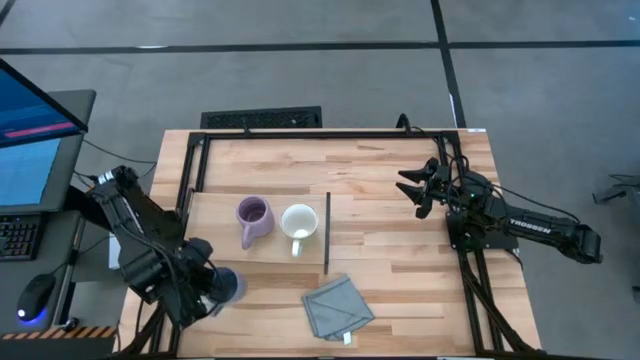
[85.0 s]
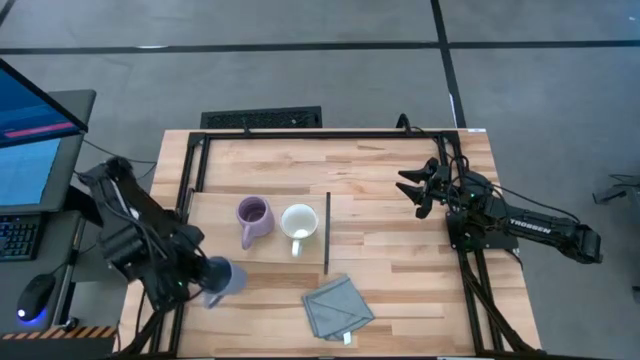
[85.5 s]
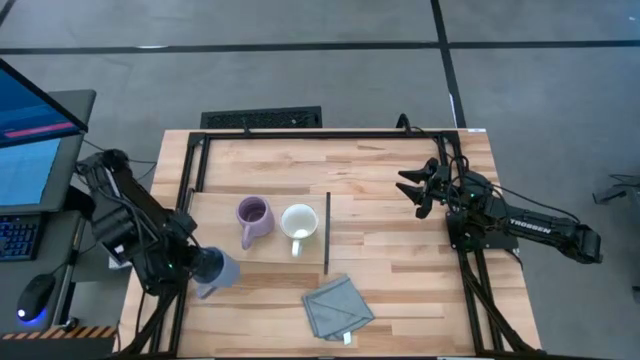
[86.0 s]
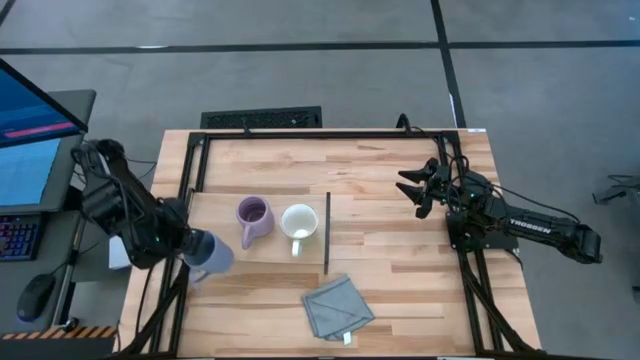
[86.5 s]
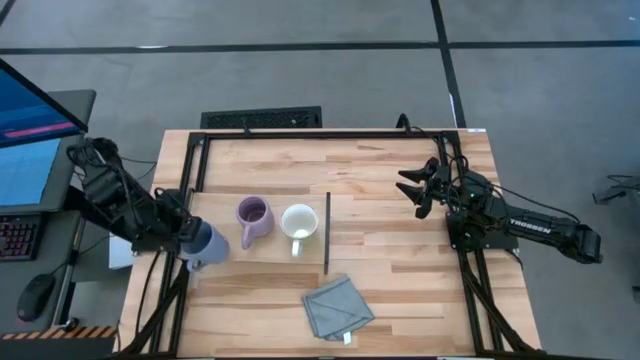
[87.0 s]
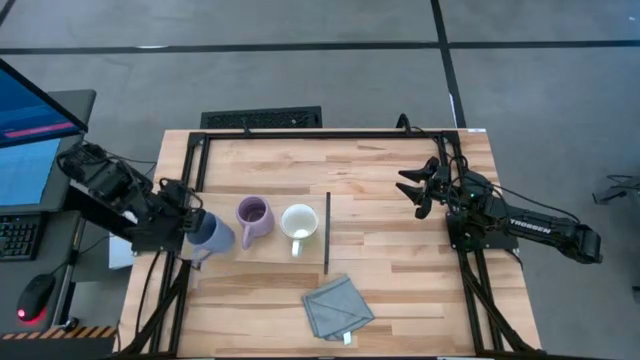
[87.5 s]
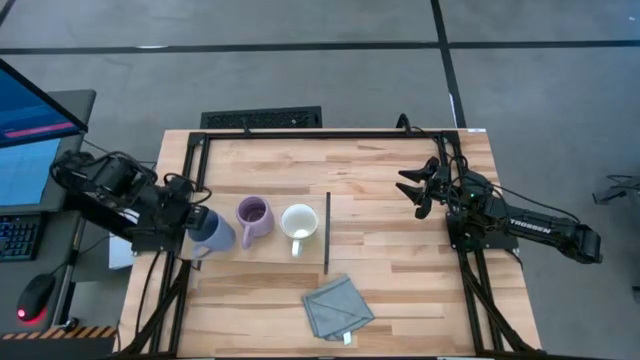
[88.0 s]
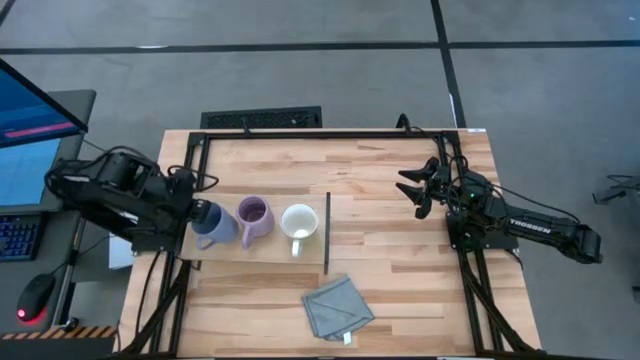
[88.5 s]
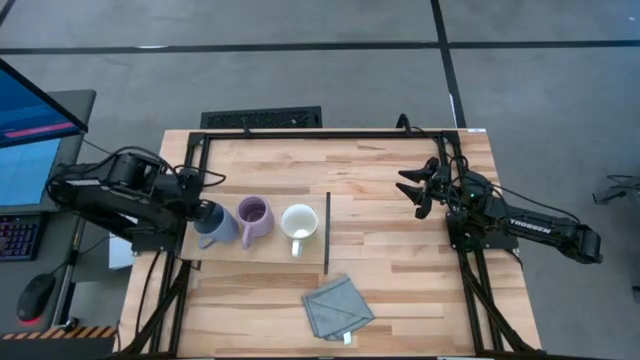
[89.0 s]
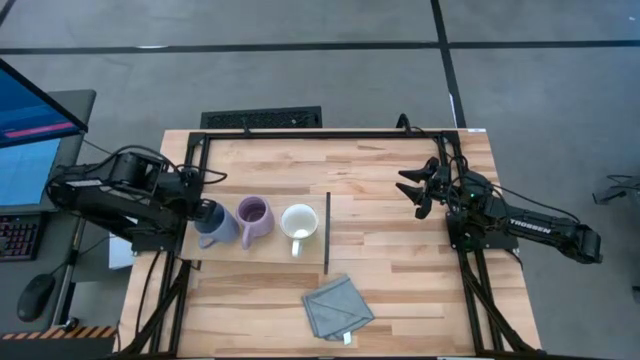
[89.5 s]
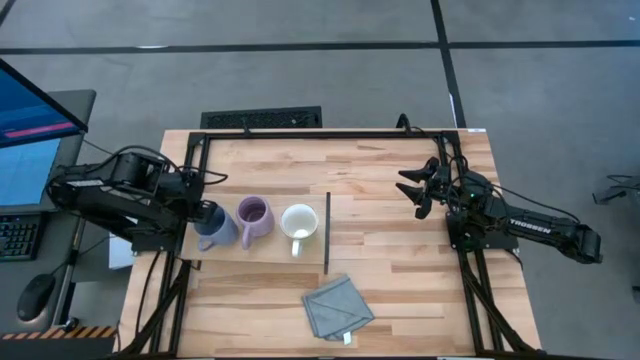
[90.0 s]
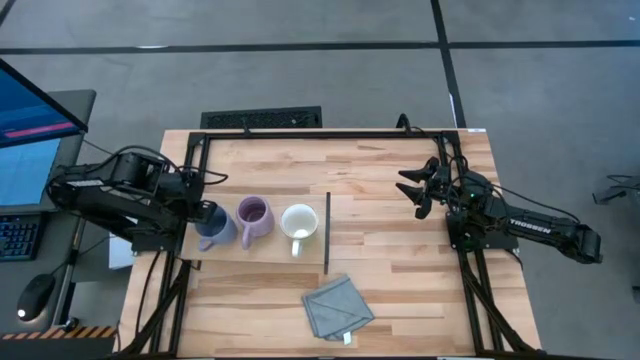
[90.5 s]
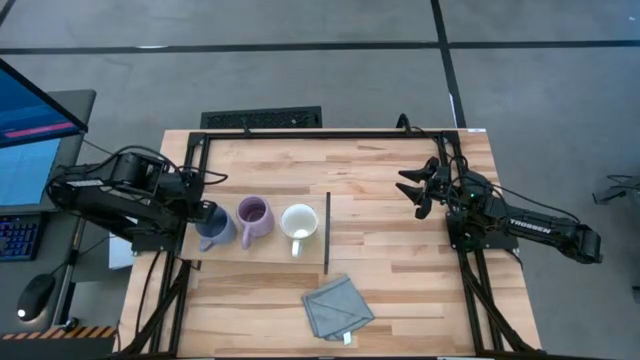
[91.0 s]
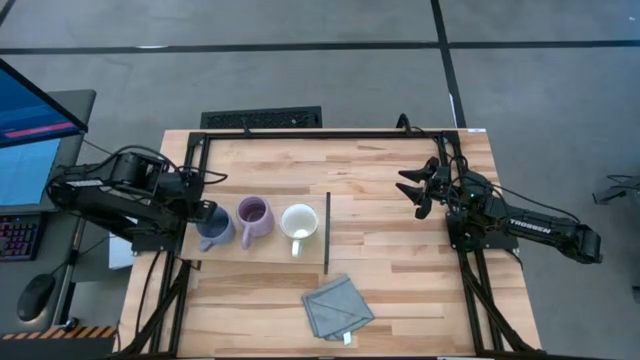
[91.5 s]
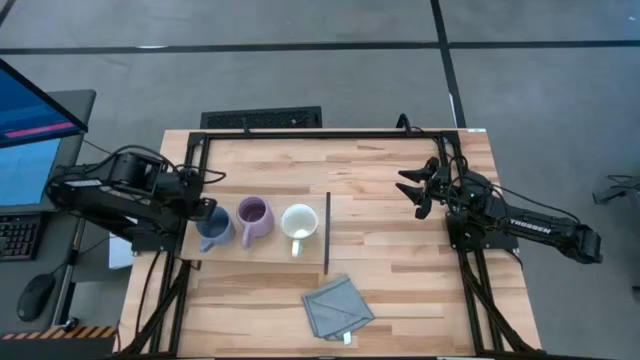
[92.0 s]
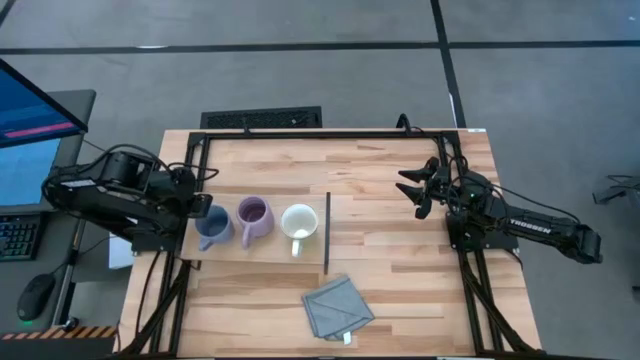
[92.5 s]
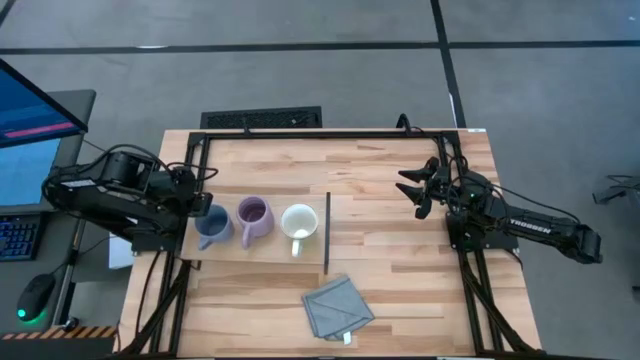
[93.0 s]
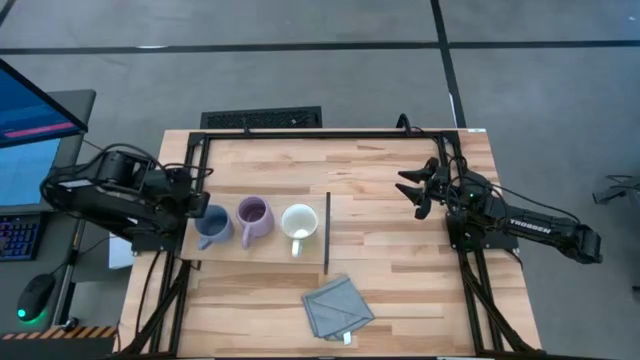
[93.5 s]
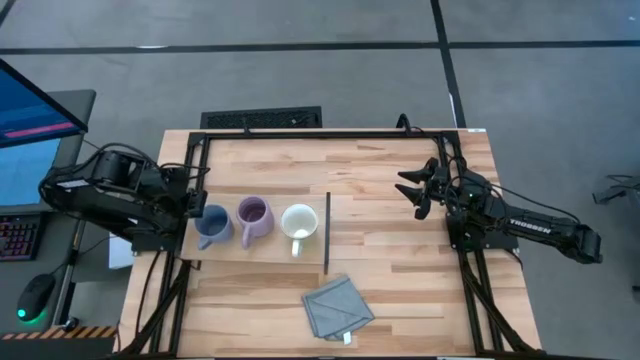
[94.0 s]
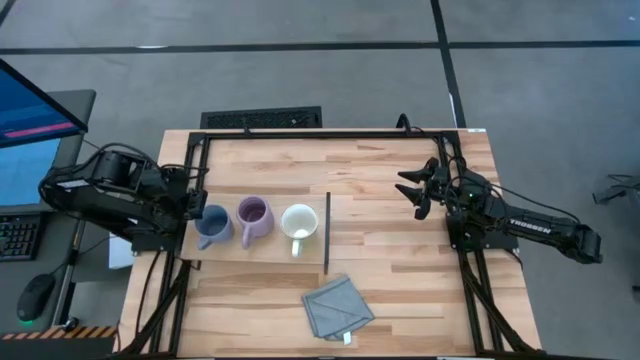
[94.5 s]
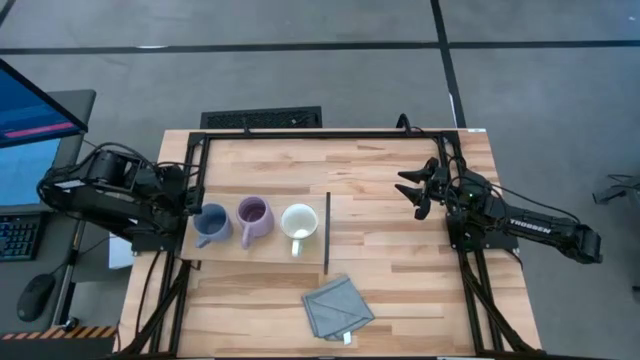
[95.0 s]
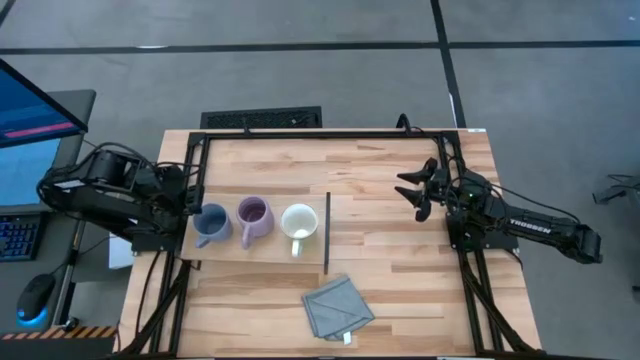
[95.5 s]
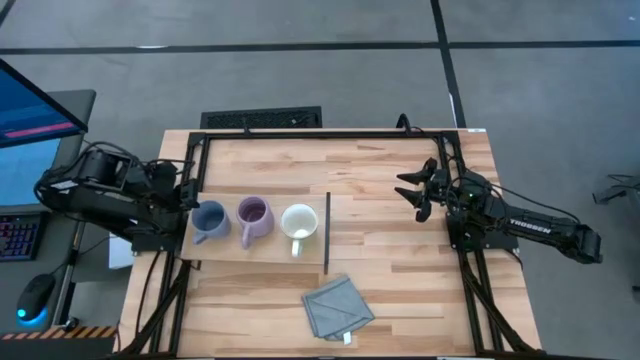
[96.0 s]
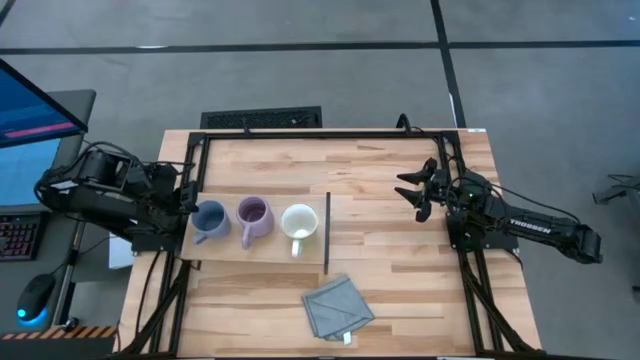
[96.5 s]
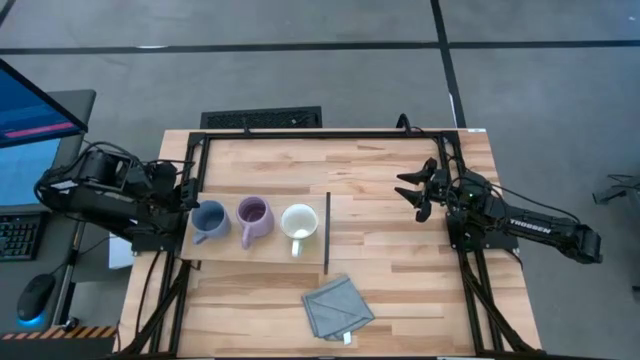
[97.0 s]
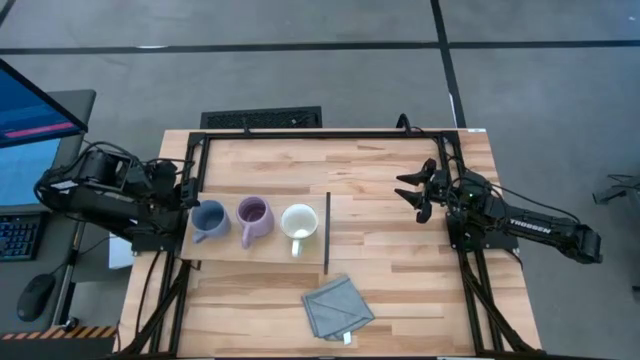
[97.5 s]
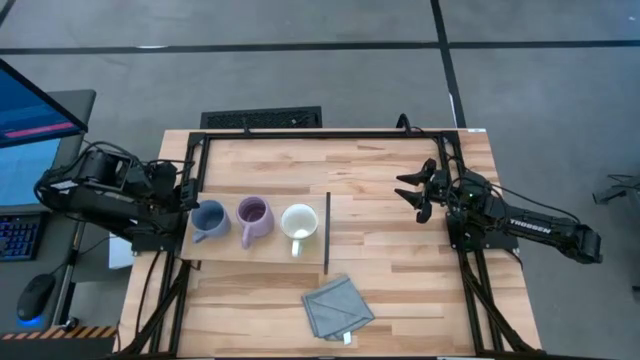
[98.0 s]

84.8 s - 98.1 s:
Task: Stack small to large cups/mugs on shelf
Put the blue mug on the shelf

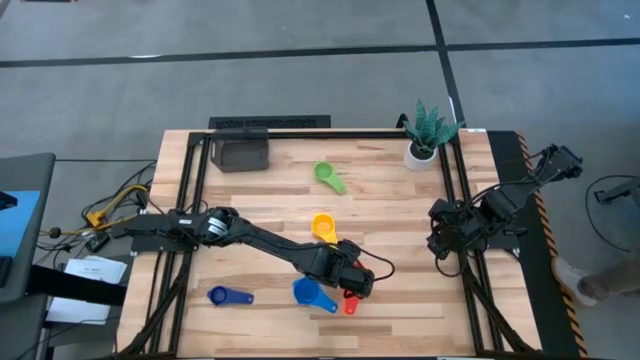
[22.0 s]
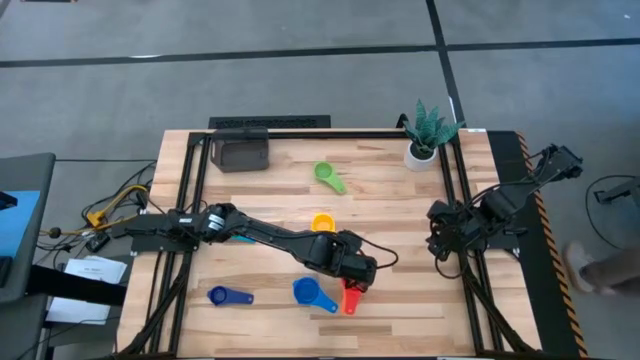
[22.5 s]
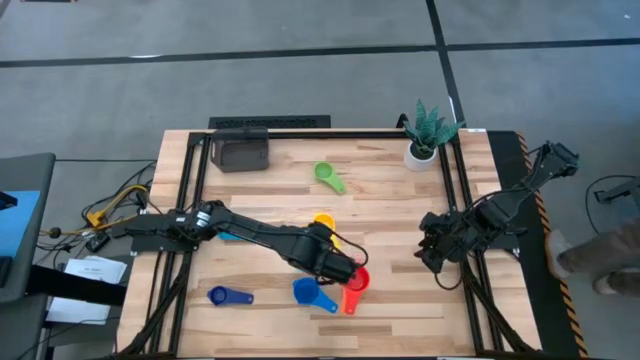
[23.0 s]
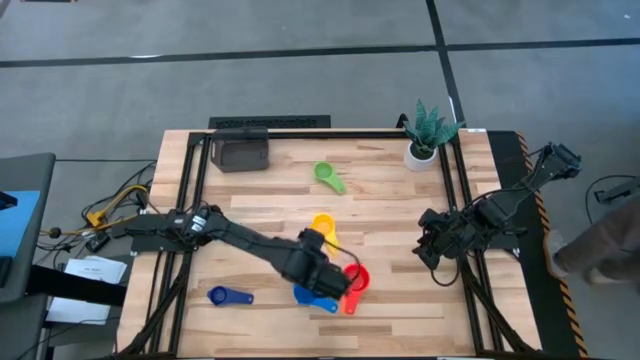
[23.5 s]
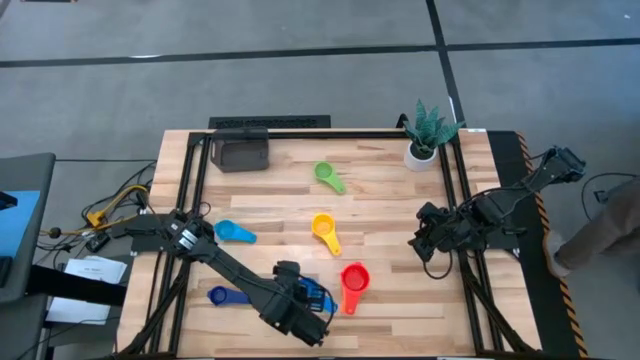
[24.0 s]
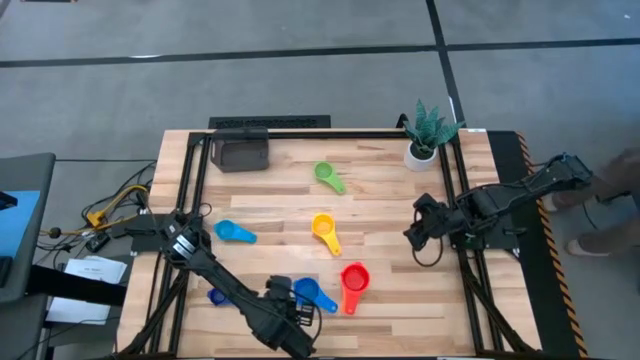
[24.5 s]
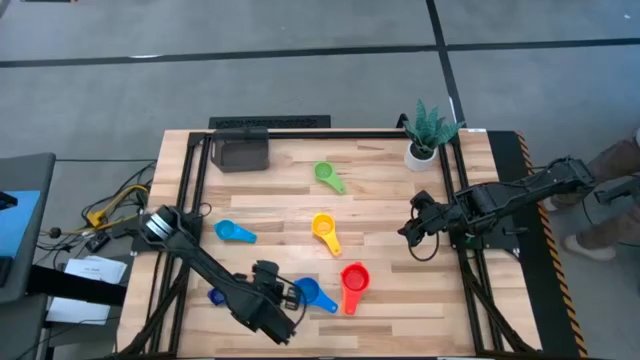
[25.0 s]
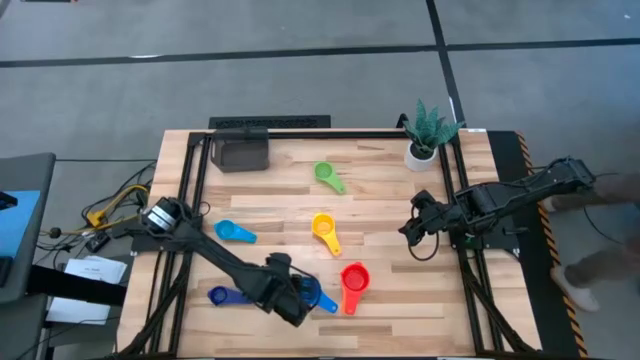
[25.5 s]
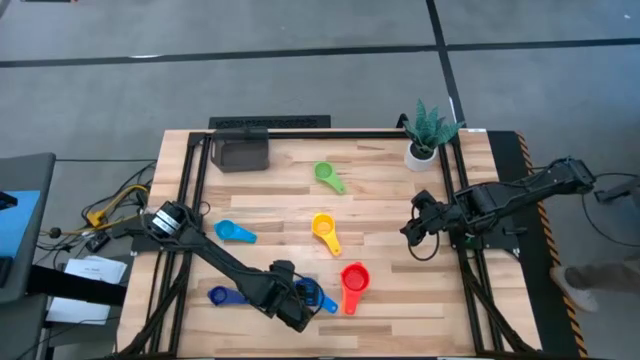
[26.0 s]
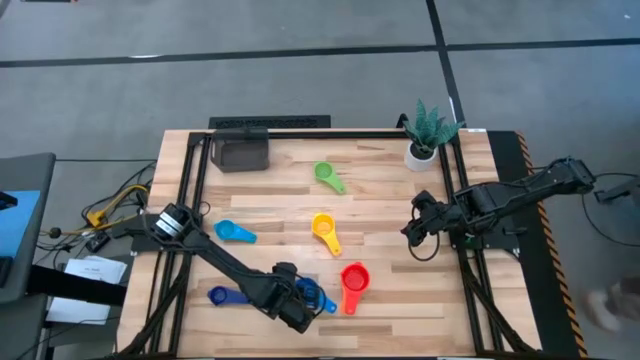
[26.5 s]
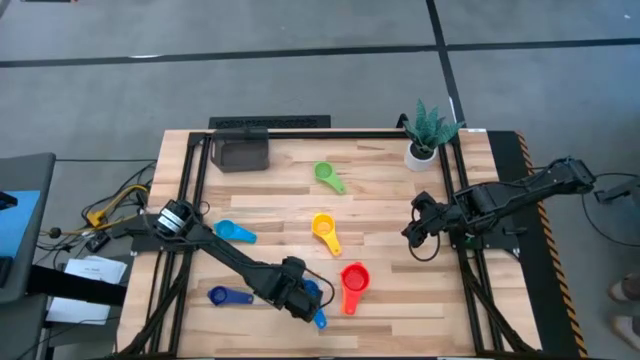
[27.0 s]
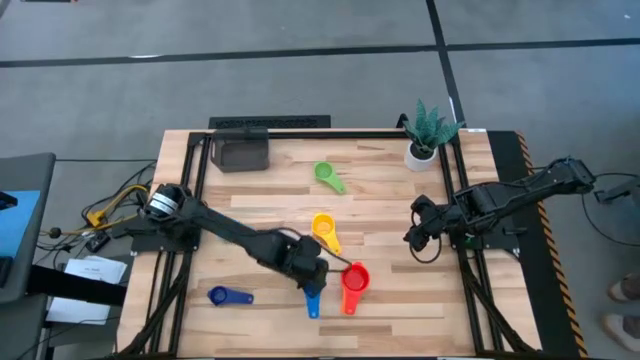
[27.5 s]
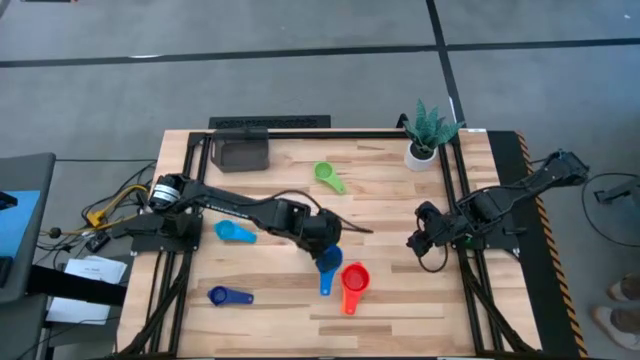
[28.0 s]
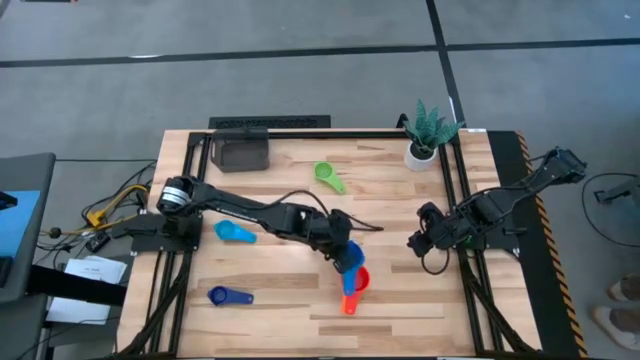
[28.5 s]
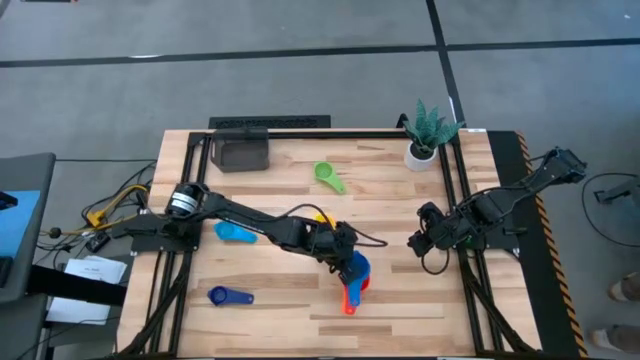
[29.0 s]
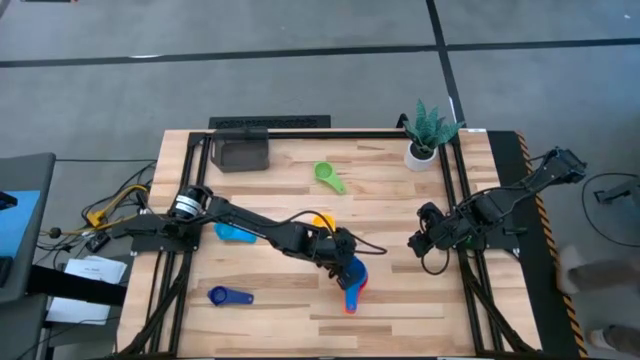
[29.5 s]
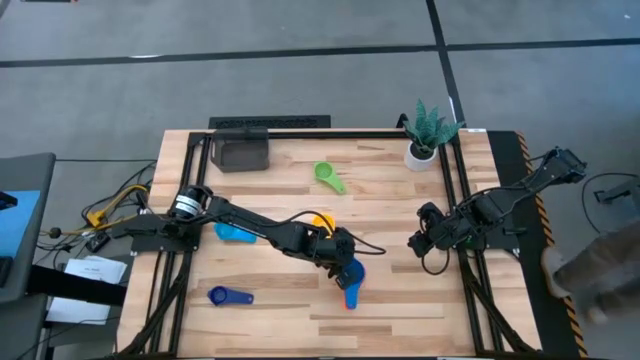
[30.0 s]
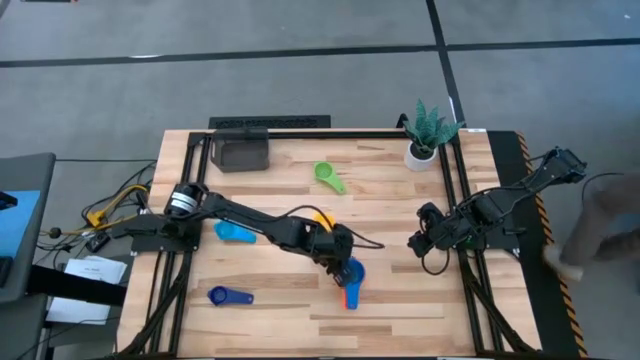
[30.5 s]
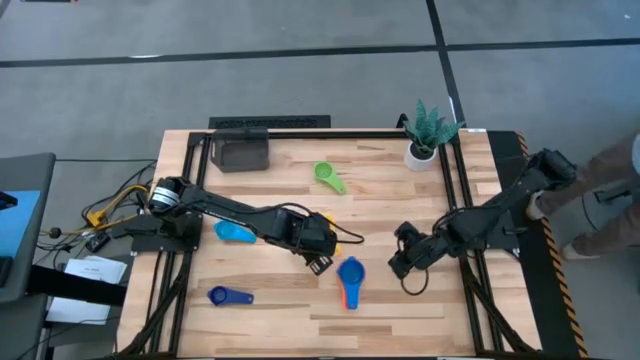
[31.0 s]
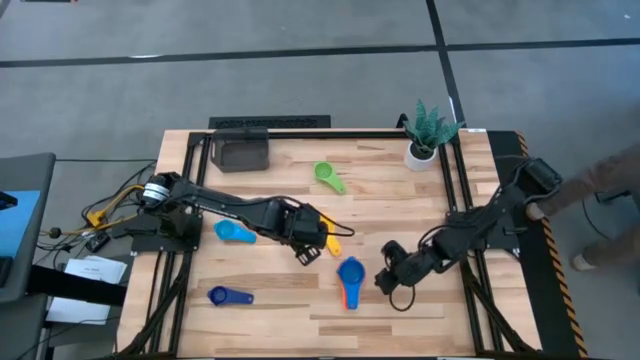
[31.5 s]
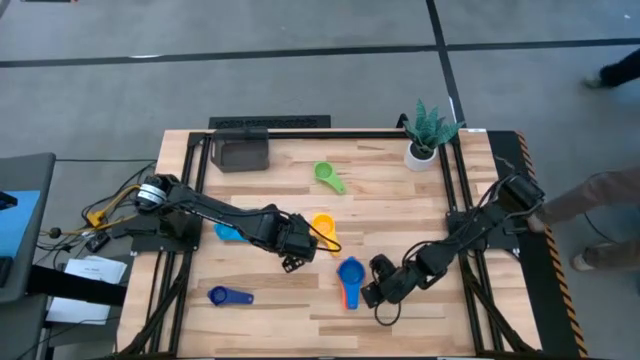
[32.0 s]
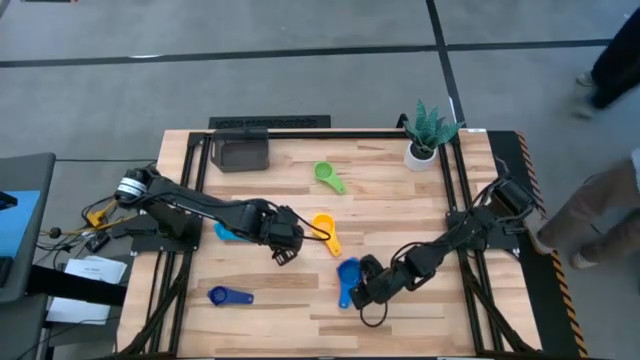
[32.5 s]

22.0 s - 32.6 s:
Task: Nest measuring cups in basket
Stack the blue measuring cup on top of the red measuring cup
